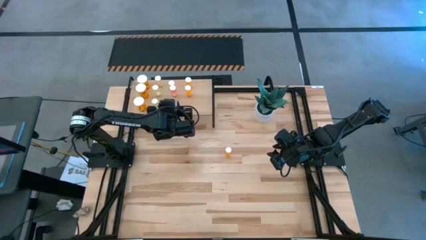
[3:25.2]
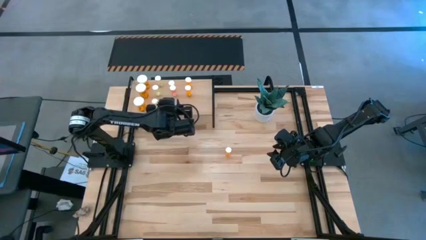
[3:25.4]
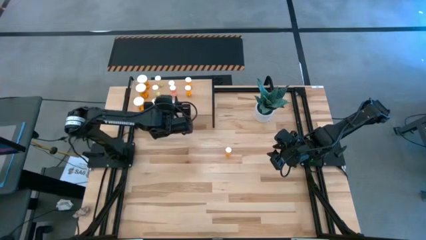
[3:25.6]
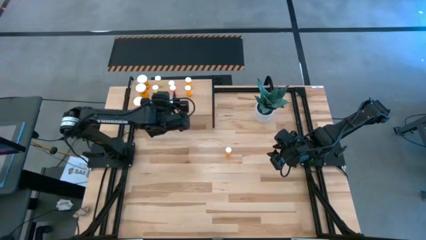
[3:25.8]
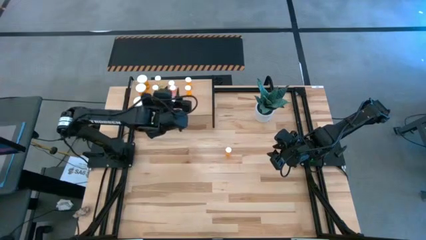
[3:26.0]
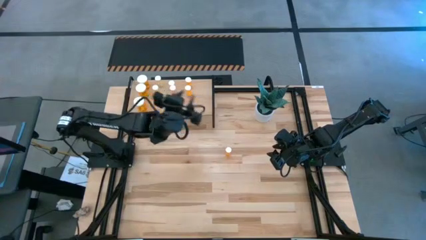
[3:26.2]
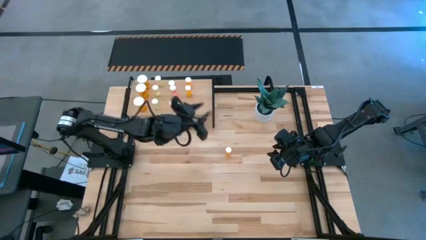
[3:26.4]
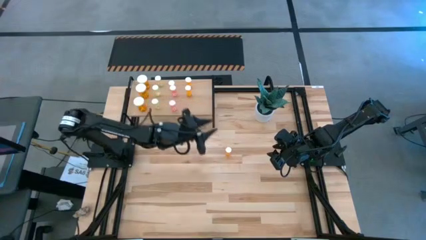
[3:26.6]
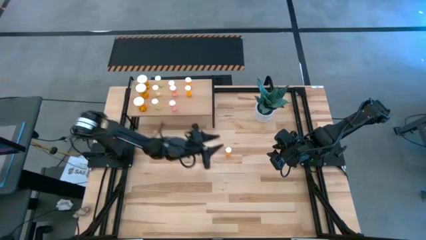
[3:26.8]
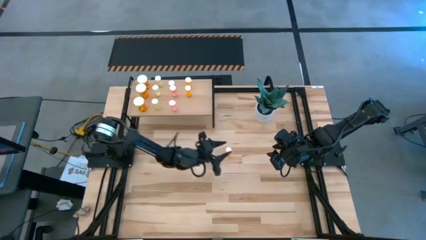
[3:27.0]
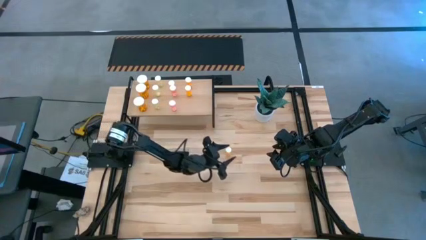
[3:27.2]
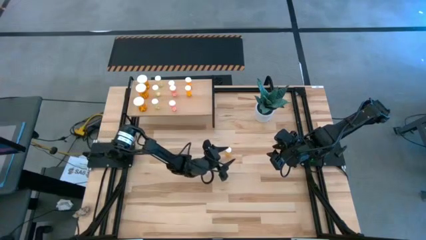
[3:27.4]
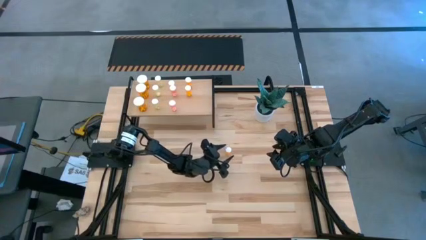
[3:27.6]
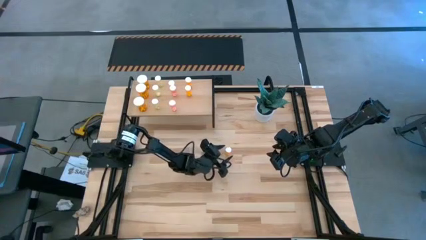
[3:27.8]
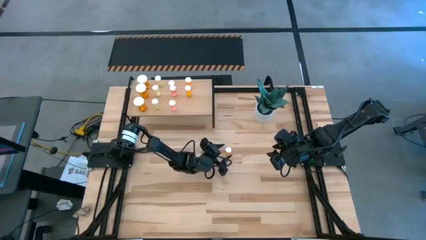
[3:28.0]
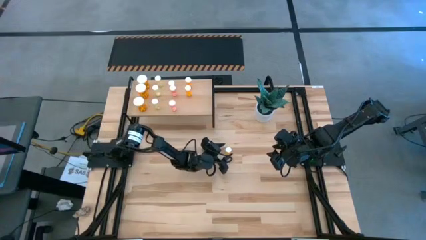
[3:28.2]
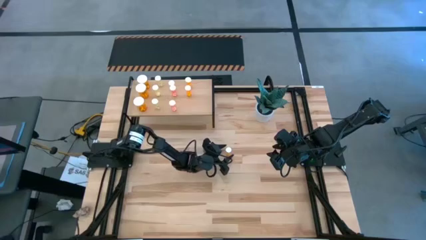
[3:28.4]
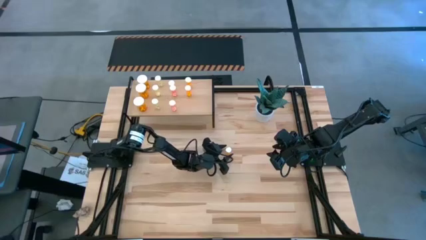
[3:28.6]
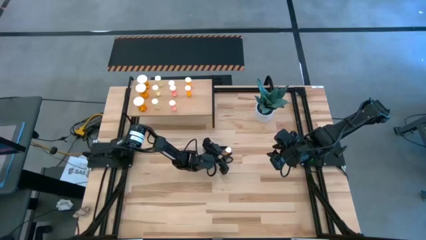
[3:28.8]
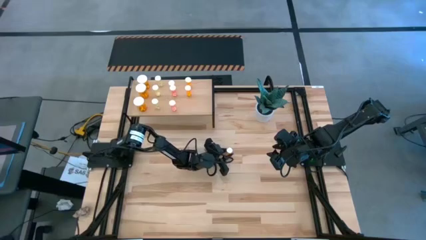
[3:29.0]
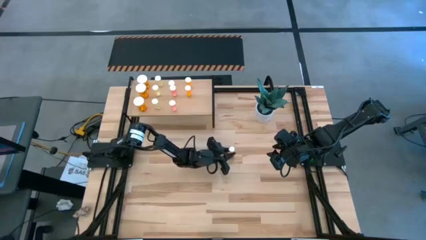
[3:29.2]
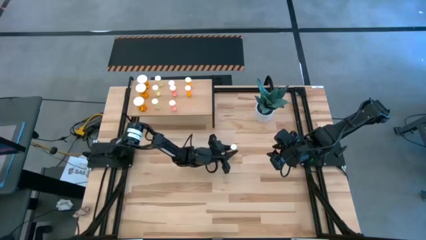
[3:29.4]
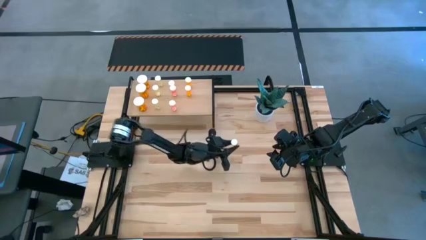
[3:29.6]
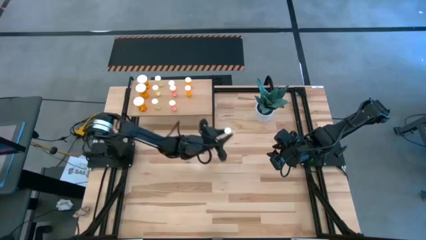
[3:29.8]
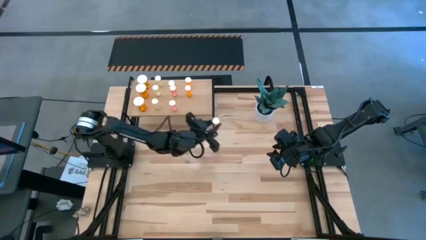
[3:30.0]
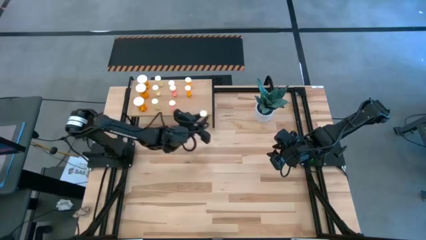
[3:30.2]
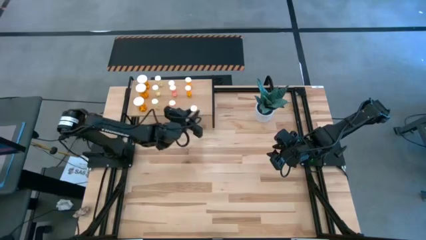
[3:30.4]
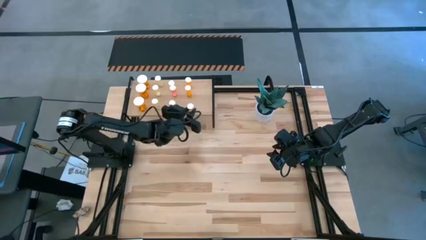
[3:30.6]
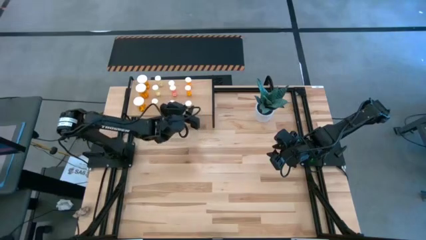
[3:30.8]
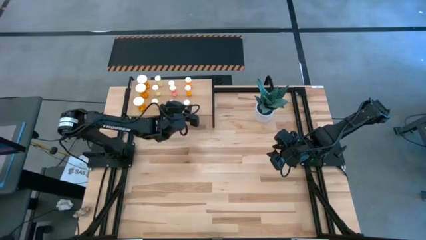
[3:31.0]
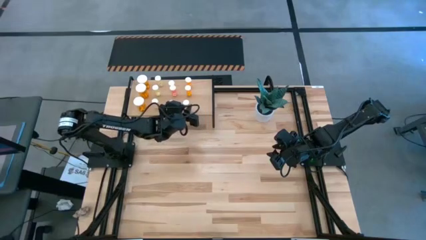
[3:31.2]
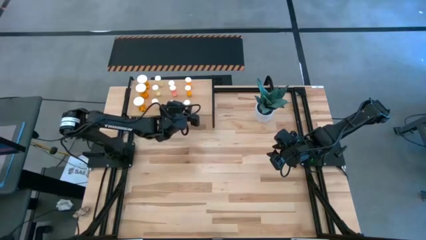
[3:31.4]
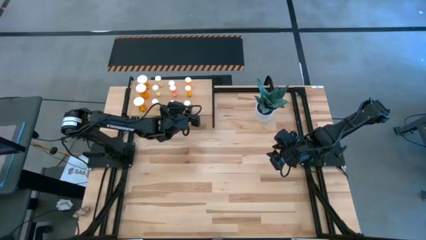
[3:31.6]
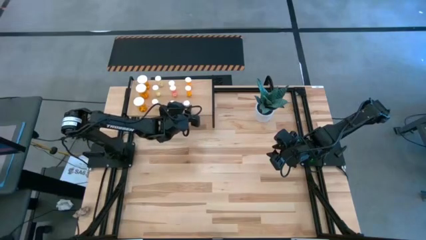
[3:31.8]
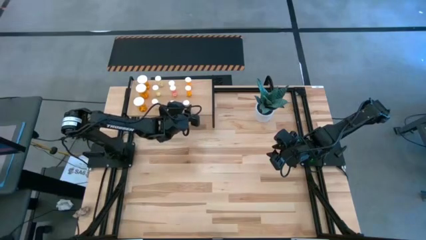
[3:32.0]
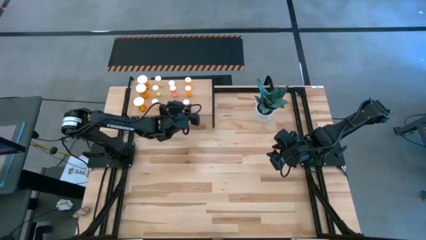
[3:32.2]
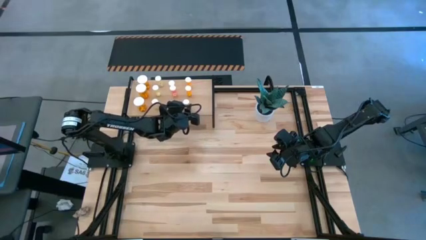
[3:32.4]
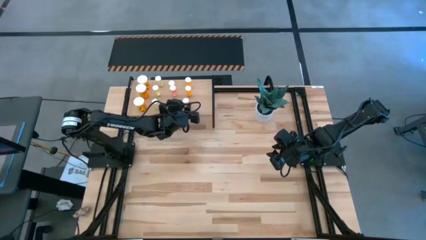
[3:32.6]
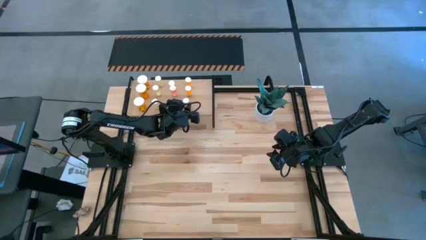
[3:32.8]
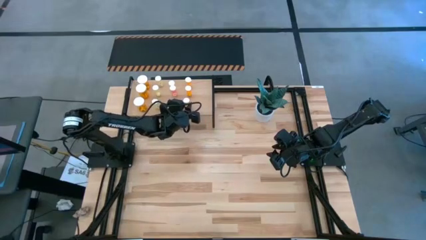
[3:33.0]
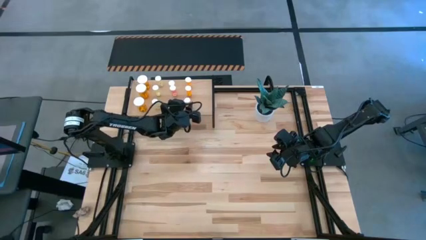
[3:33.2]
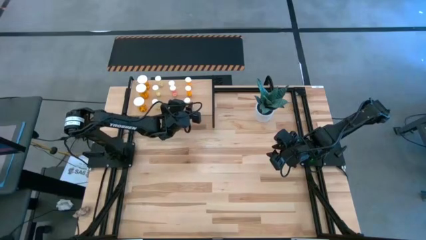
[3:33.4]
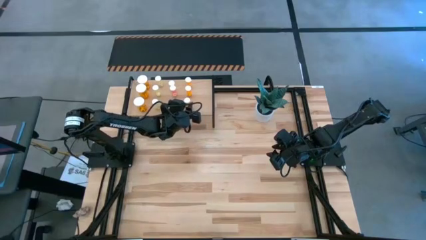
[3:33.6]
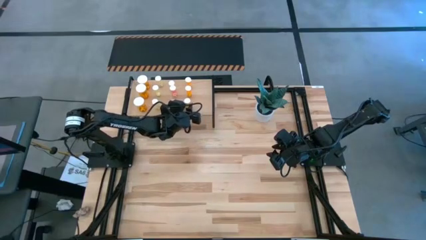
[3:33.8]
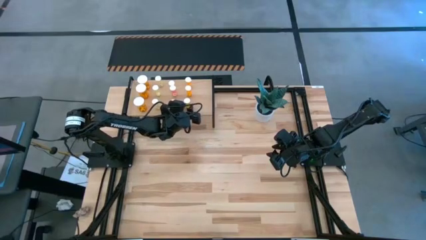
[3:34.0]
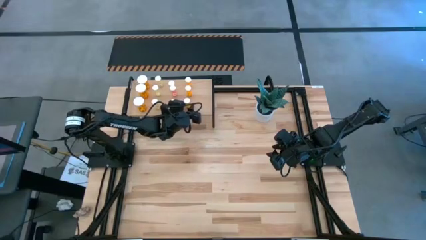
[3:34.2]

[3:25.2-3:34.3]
Task: Pick and place medicine bottles onto shelf by color
Put the small orange pill bottle on the shelf aligned with the other small orange pill bottles
